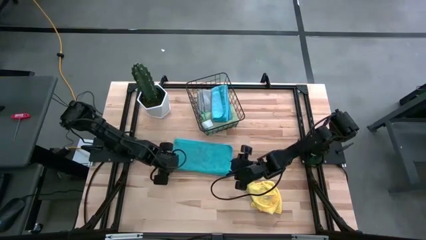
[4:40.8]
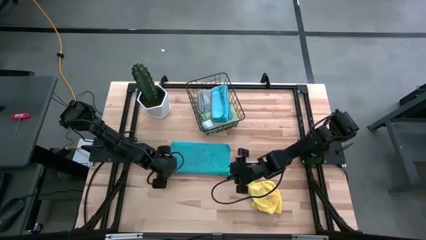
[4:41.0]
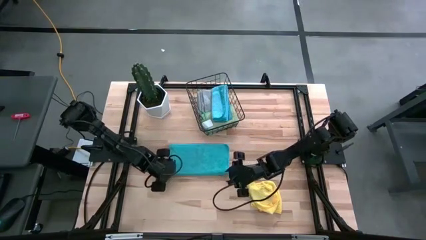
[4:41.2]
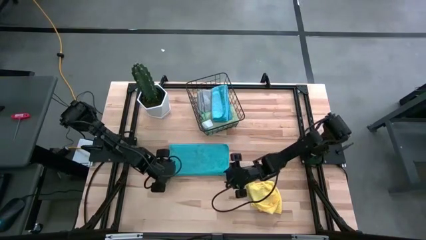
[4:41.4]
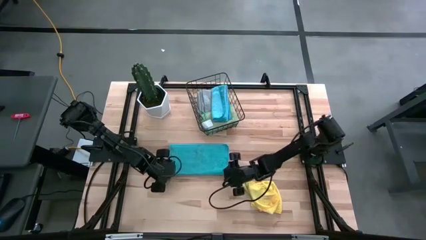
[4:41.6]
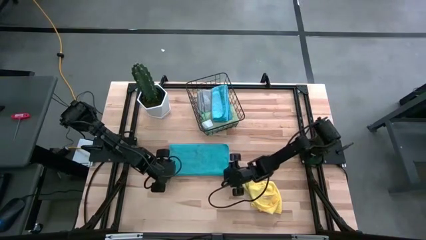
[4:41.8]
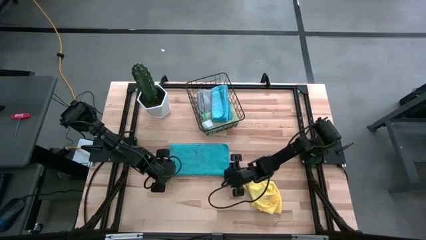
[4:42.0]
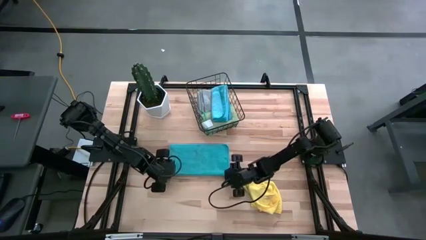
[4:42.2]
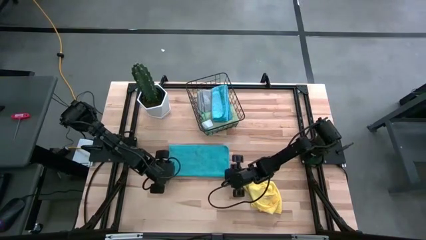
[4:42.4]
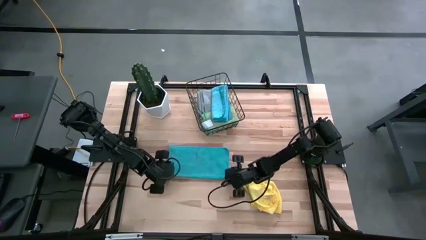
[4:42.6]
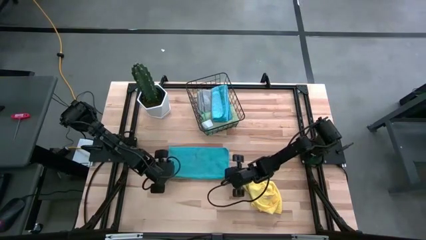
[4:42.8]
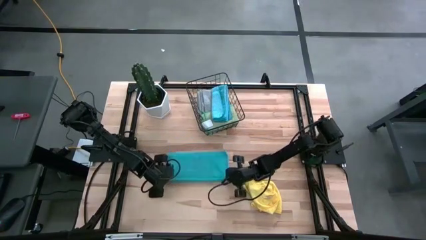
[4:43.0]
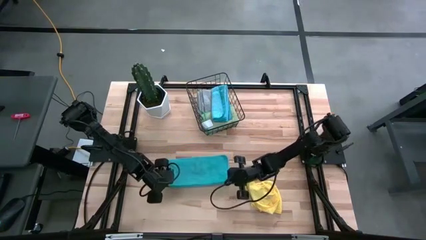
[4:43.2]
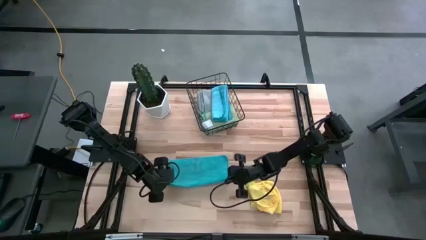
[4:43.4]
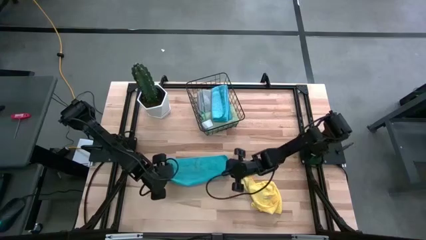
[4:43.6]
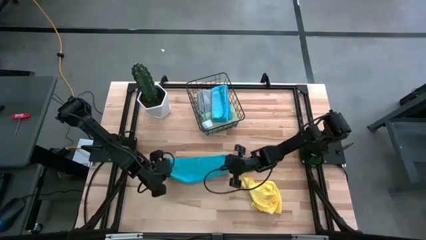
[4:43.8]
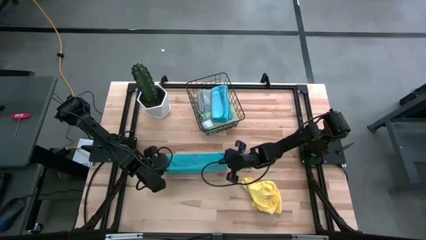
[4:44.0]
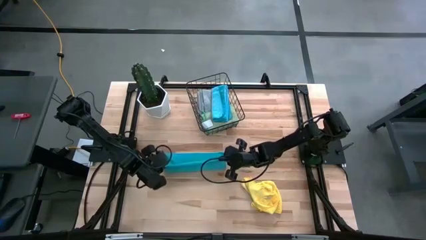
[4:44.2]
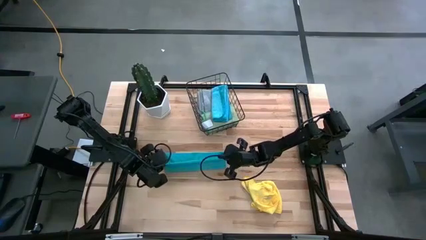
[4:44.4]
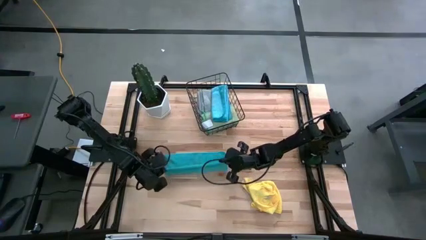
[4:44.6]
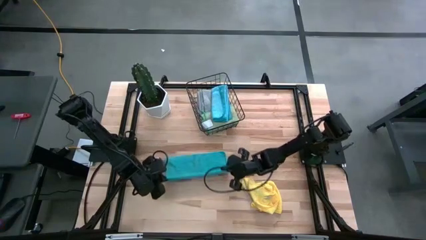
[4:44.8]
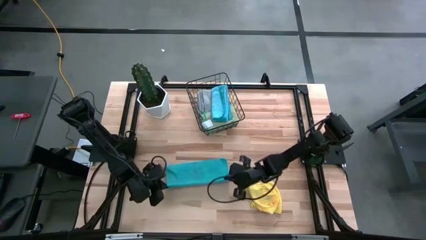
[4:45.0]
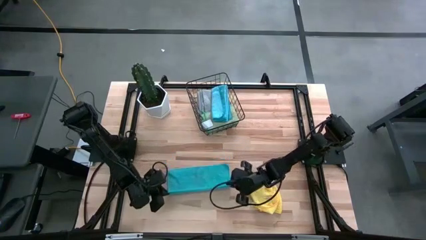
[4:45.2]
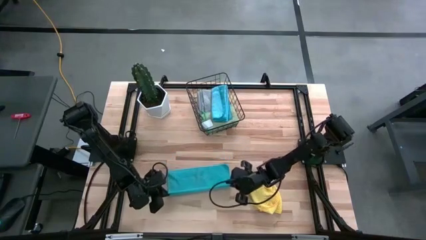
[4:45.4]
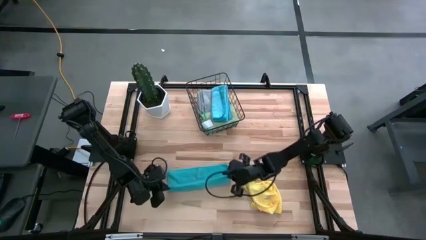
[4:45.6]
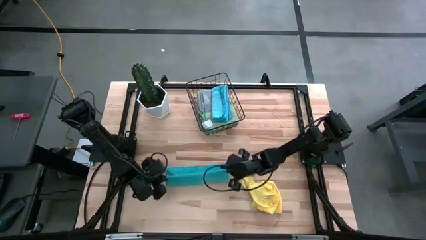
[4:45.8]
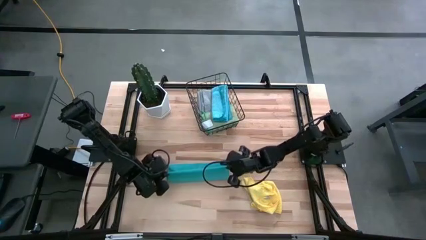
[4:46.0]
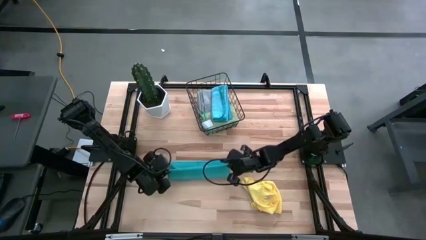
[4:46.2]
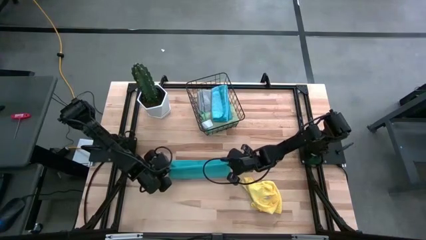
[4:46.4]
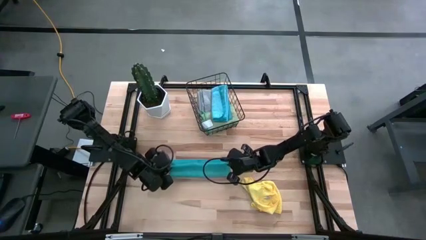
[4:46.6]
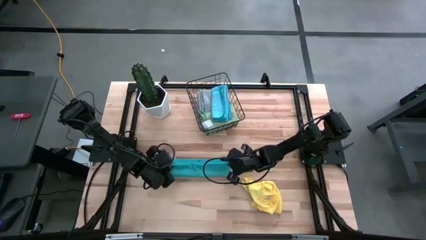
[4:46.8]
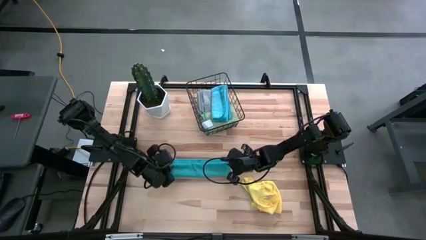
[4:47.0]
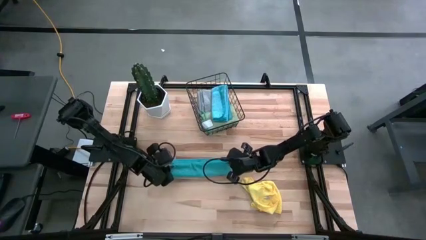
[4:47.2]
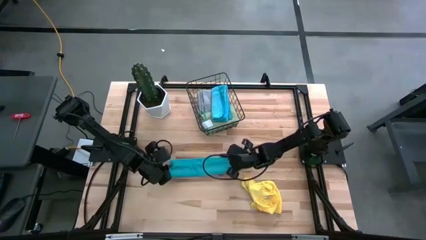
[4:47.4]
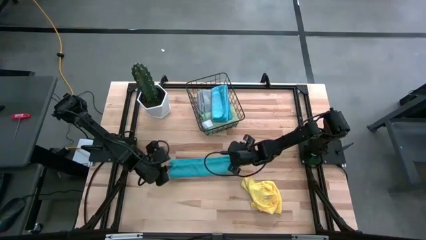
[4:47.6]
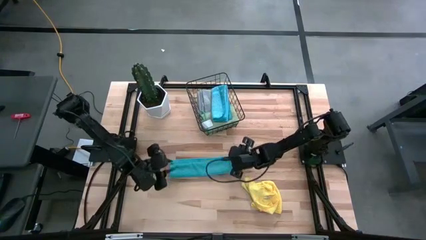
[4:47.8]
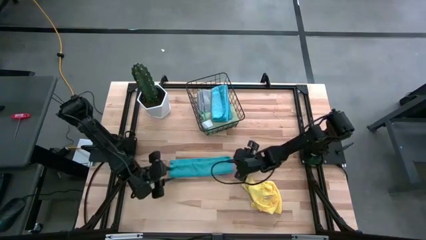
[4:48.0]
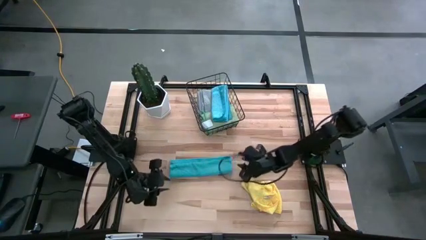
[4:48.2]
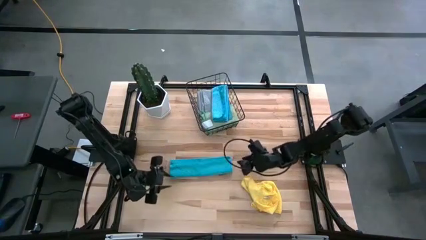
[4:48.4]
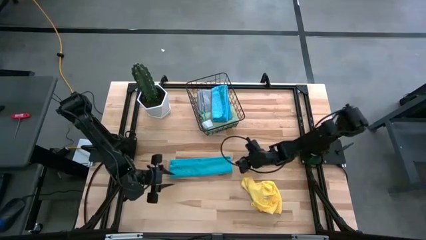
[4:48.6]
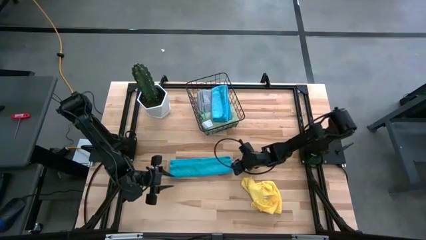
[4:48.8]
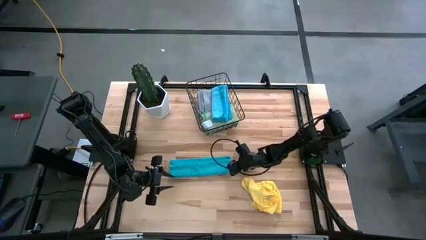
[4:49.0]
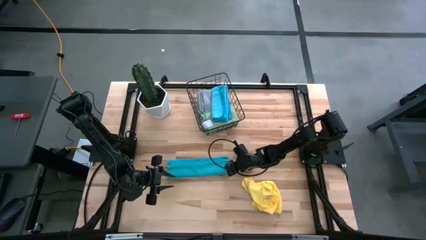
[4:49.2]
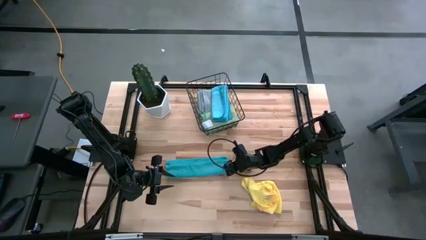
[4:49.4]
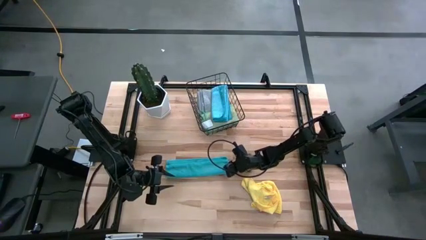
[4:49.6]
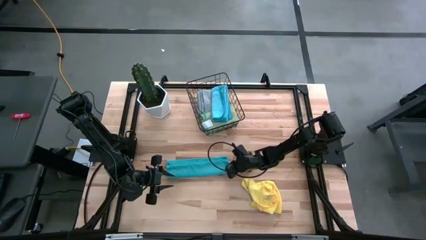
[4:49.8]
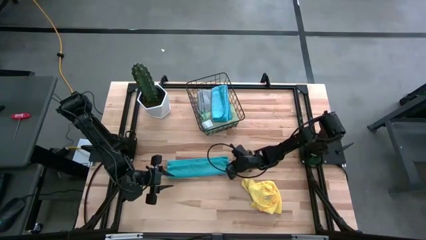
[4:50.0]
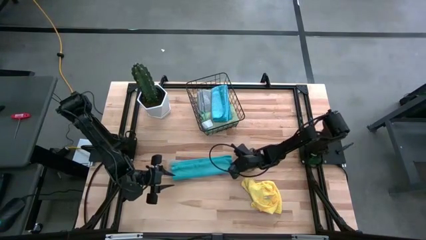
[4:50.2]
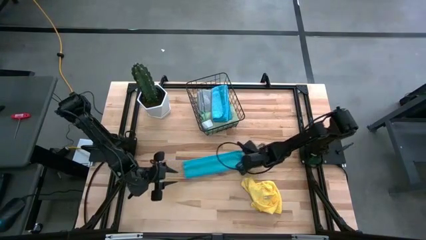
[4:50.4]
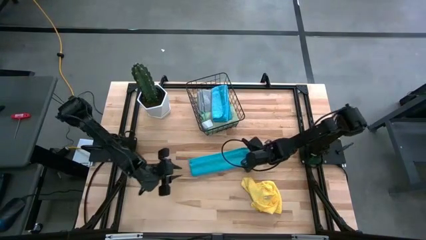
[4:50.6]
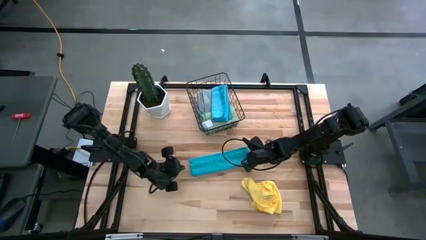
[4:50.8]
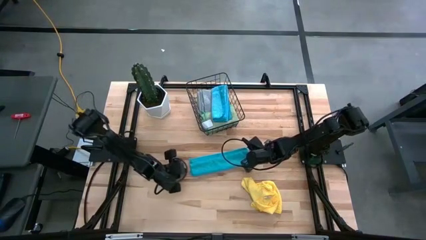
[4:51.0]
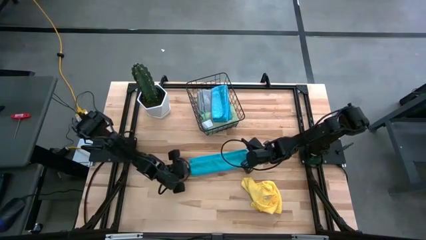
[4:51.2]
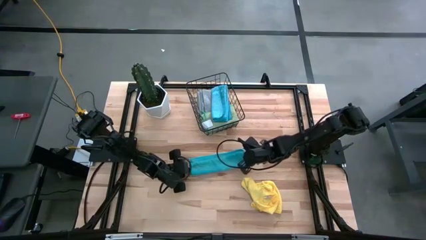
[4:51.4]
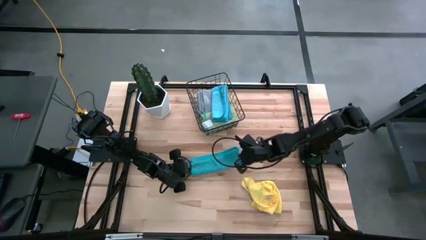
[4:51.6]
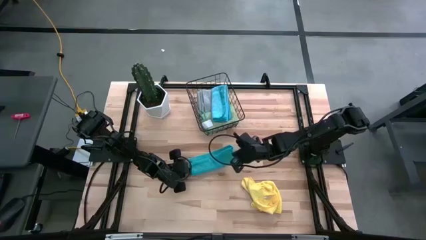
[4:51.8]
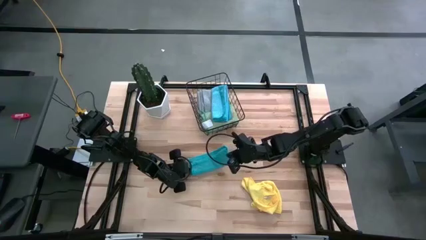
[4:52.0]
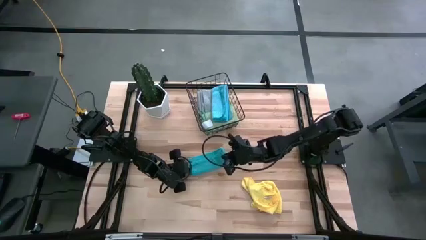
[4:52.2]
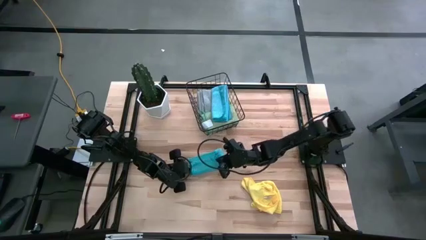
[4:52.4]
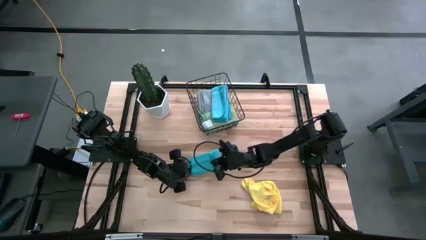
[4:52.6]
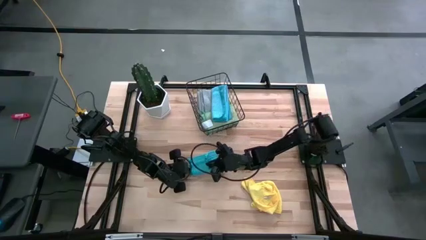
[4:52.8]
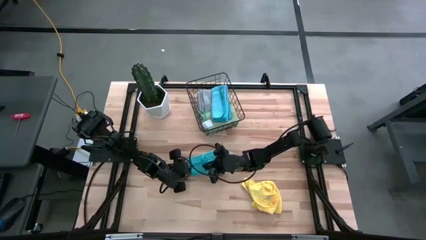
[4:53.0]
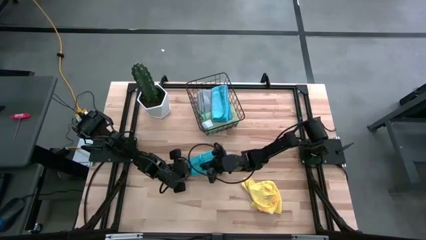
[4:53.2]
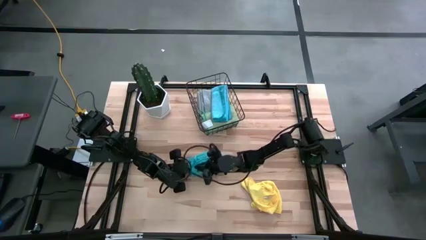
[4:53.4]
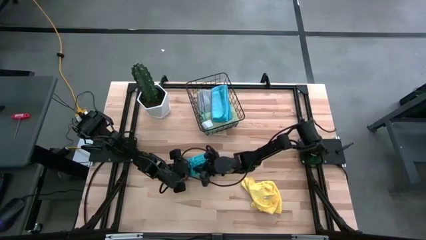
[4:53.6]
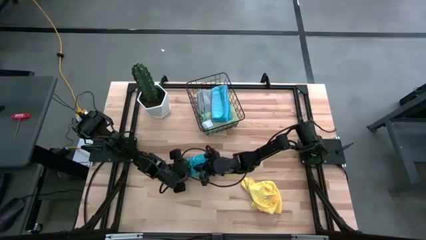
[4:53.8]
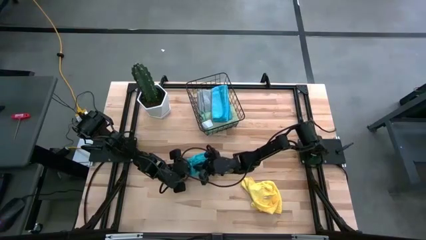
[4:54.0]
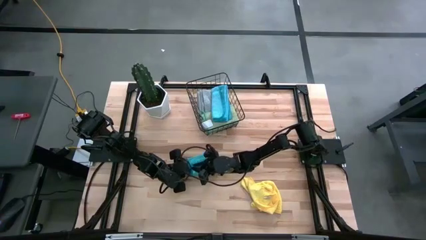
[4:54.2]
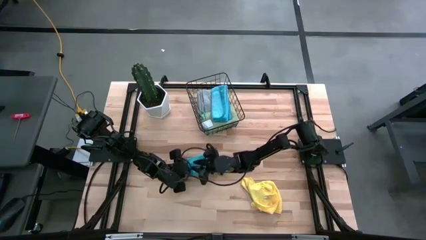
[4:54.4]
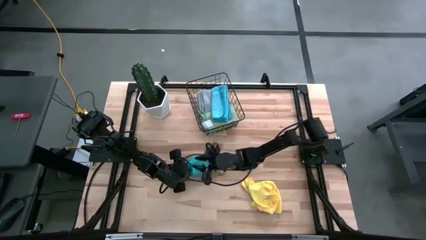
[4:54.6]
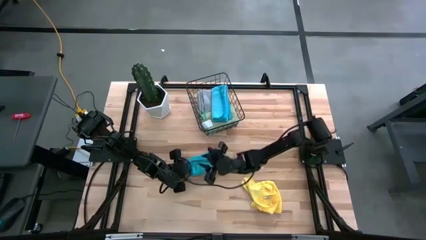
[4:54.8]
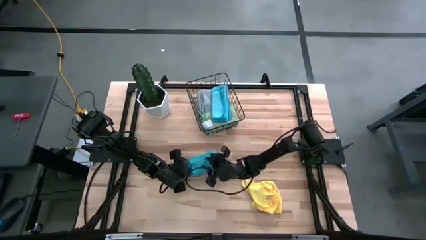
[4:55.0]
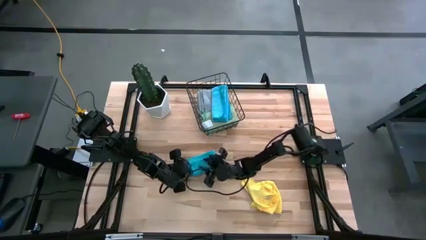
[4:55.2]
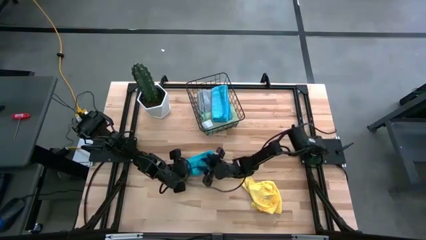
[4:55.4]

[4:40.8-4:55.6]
Task: Fold microfiber towels
Fold the blue microfiber cloth

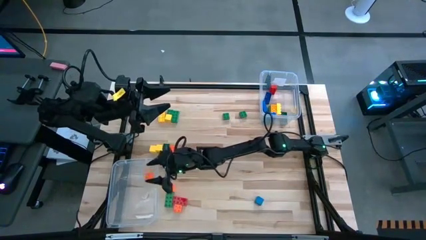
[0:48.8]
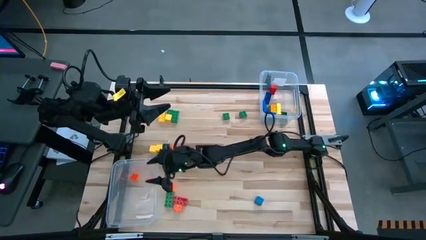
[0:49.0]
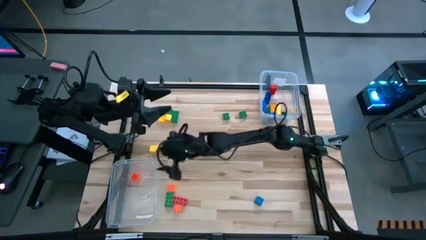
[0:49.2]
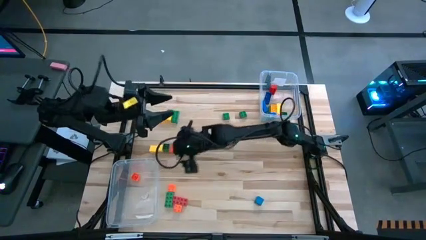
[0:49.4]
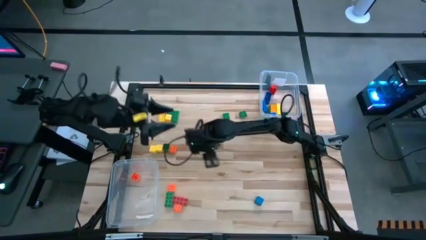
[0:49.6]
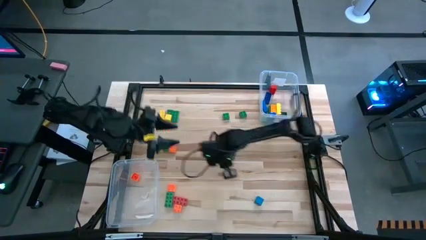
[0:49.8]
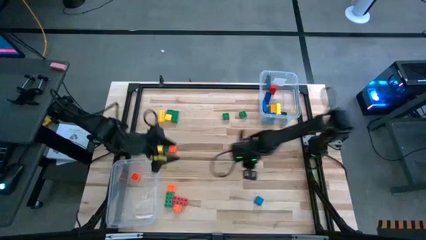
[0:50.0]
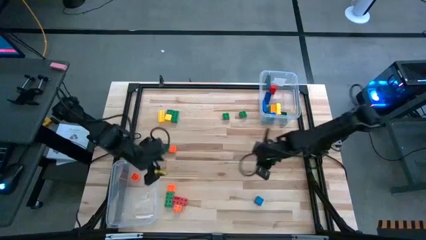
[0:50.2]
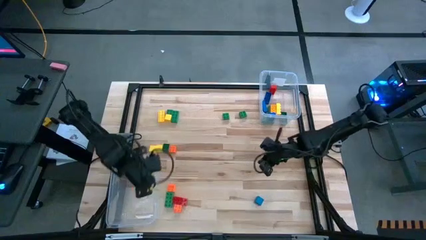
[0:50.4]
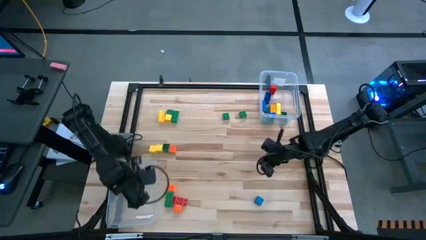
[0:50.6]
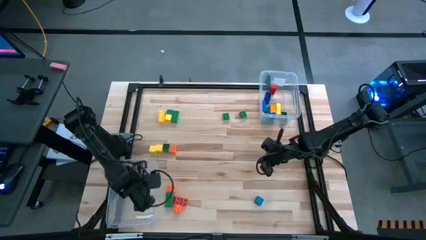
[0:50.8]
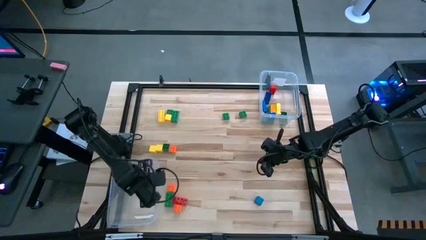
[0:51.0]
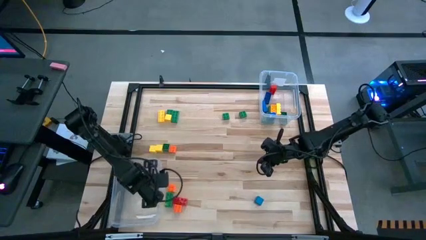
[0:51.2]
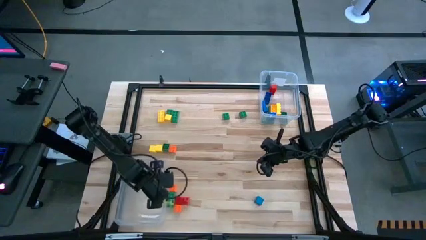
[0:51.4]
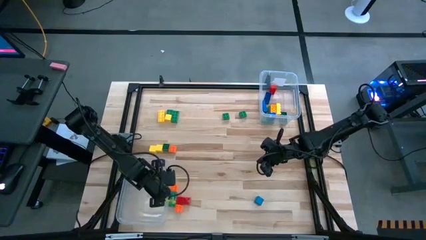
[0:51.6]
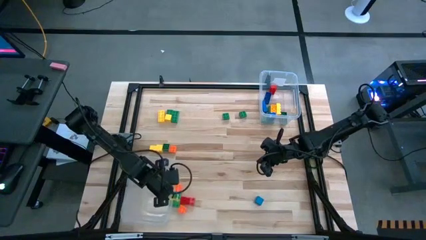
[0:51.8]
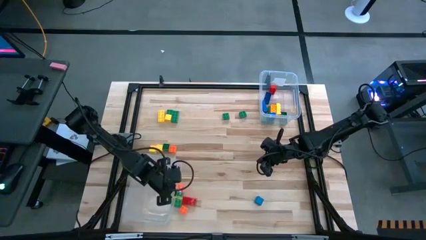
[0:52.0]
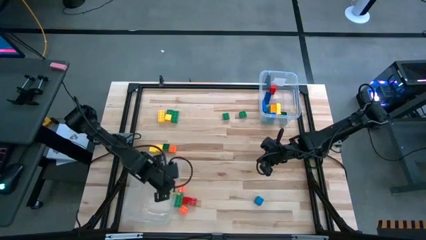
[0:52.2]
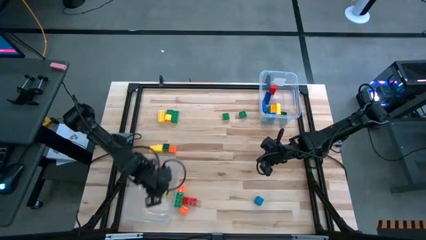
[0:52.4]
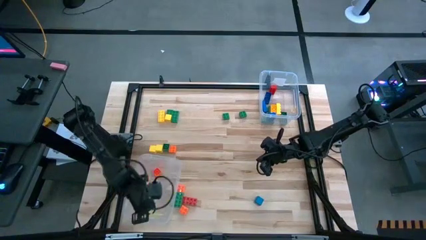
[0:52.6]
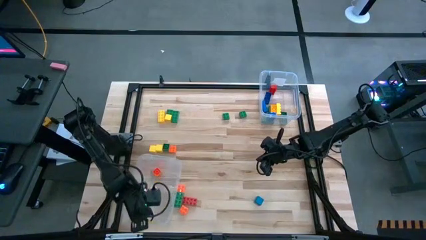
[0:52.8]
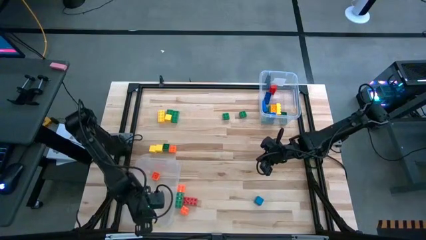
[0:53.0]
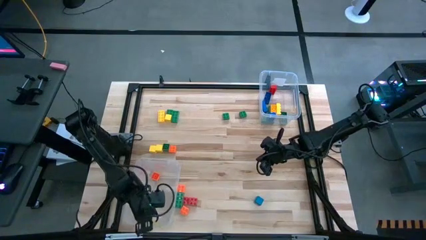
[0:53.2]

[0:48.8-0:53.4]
Task: Sort blocks by size
Move the left transparent bin to the right
